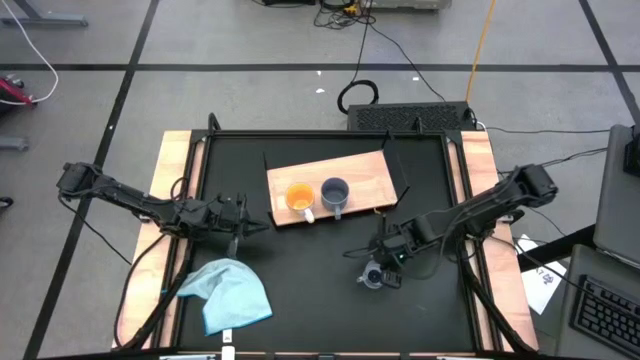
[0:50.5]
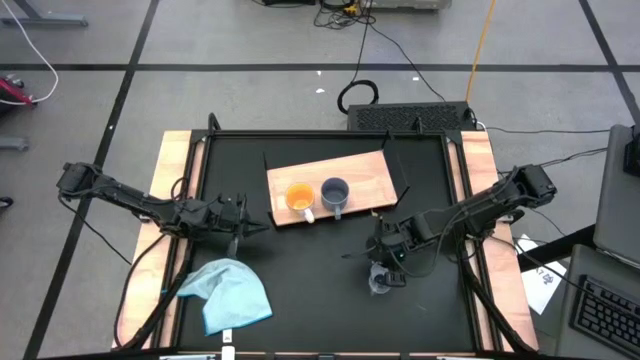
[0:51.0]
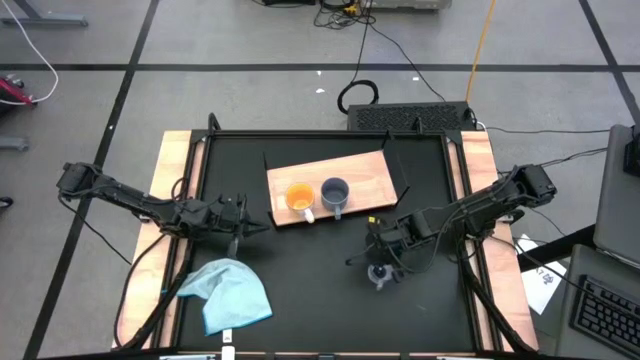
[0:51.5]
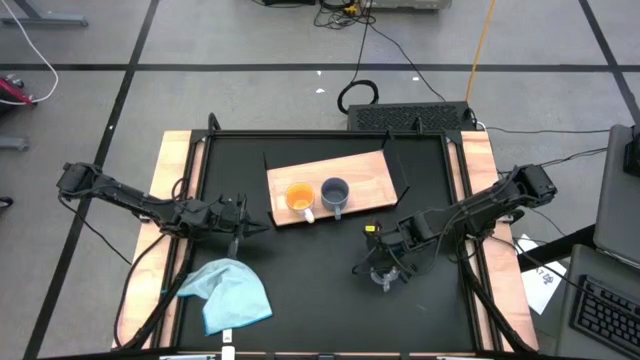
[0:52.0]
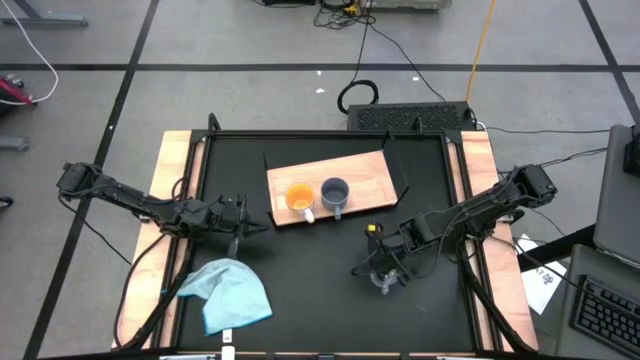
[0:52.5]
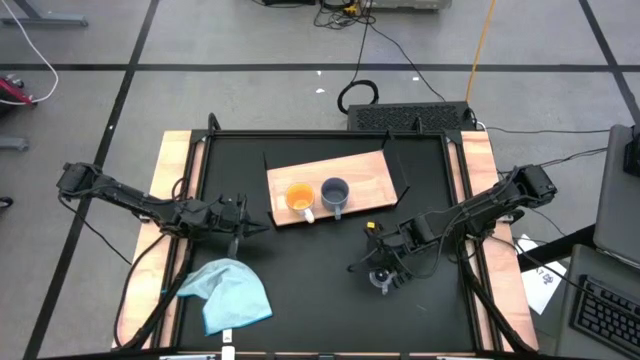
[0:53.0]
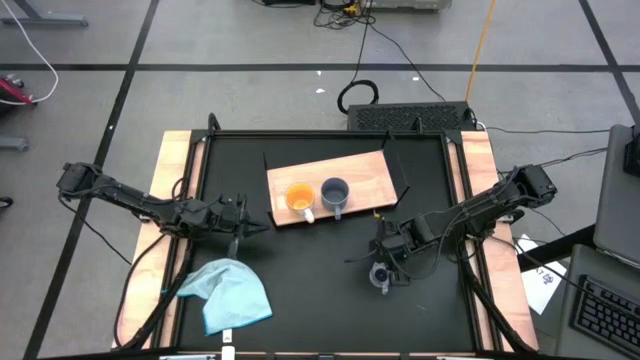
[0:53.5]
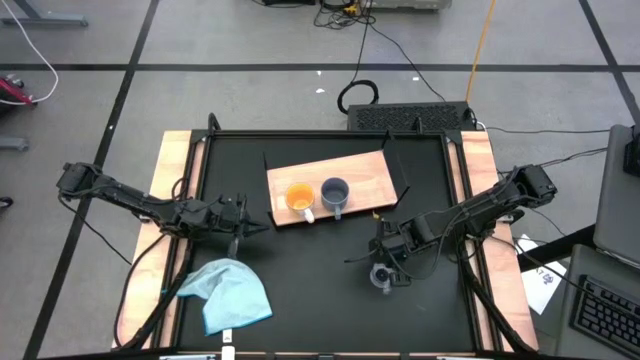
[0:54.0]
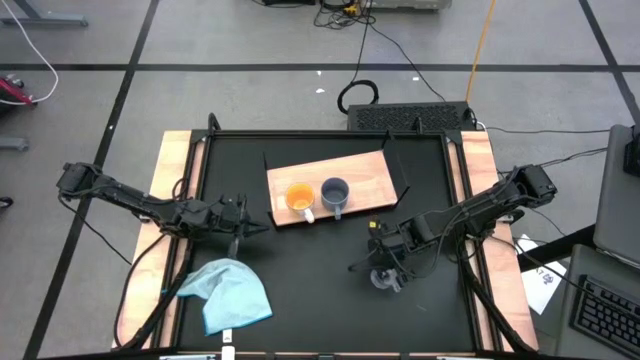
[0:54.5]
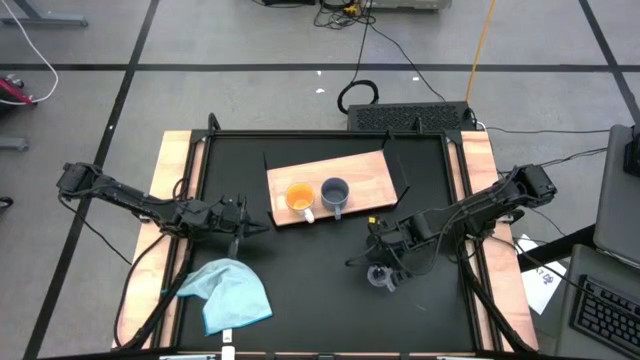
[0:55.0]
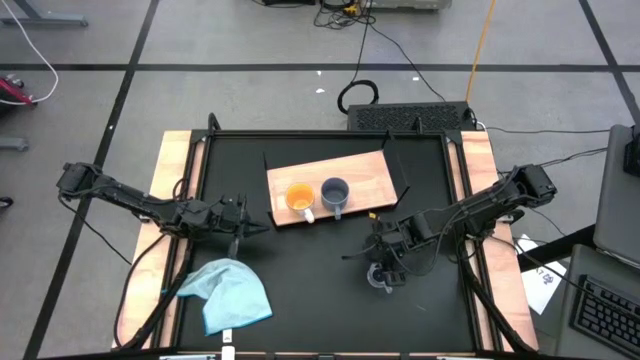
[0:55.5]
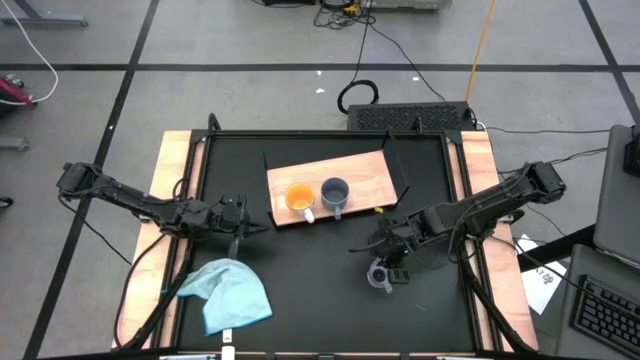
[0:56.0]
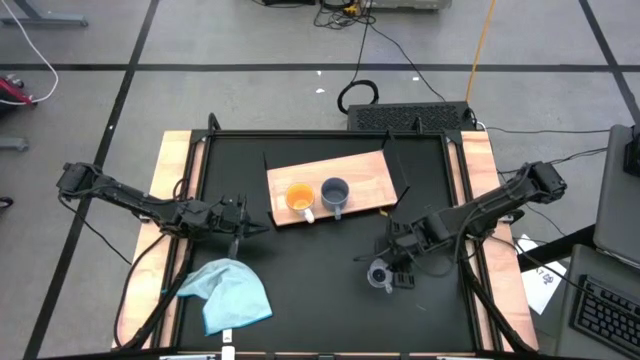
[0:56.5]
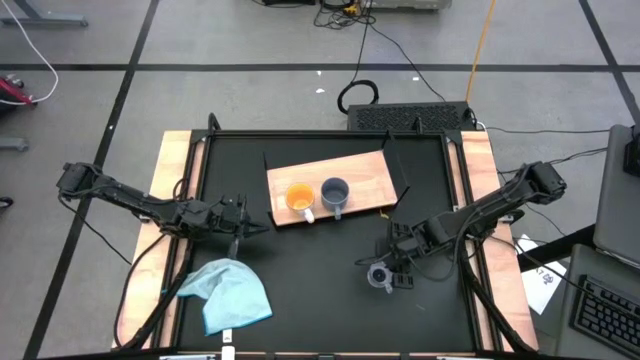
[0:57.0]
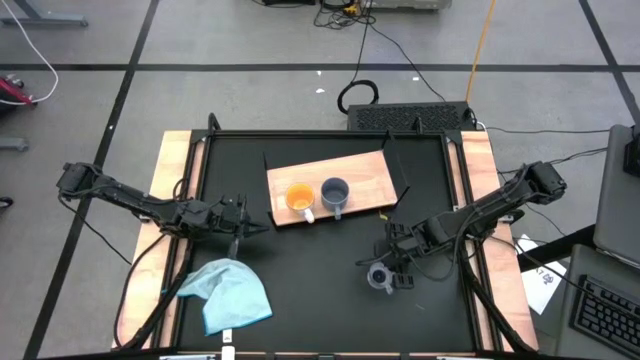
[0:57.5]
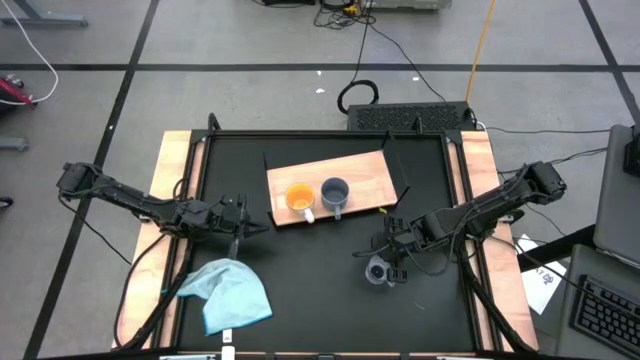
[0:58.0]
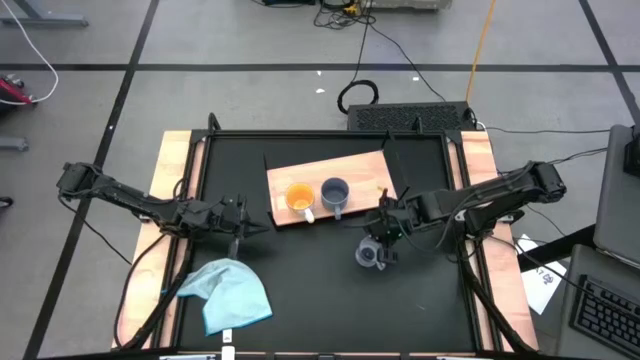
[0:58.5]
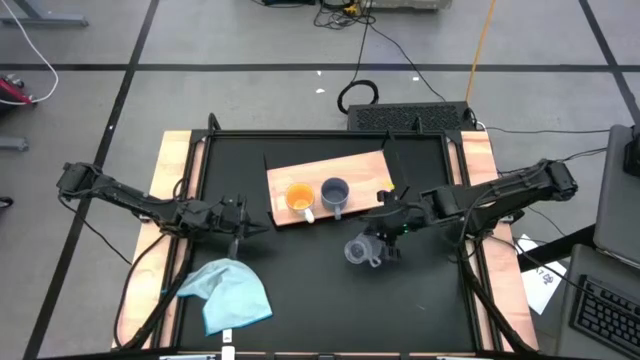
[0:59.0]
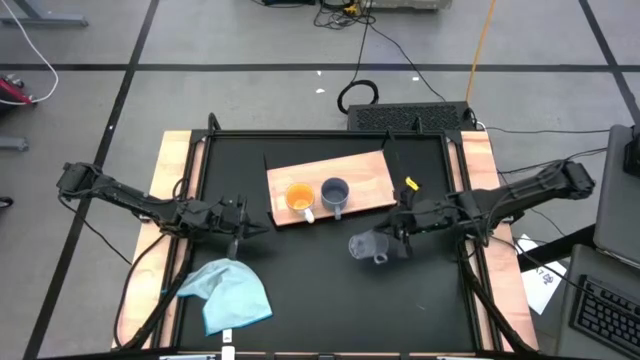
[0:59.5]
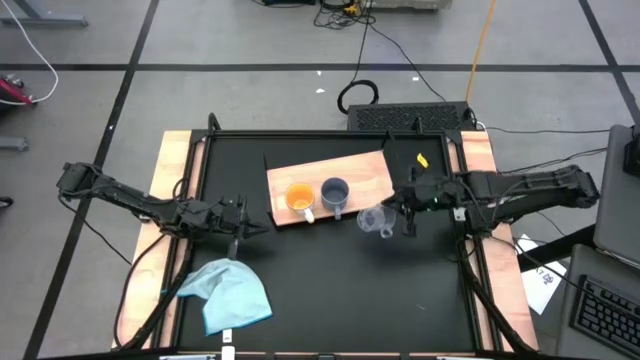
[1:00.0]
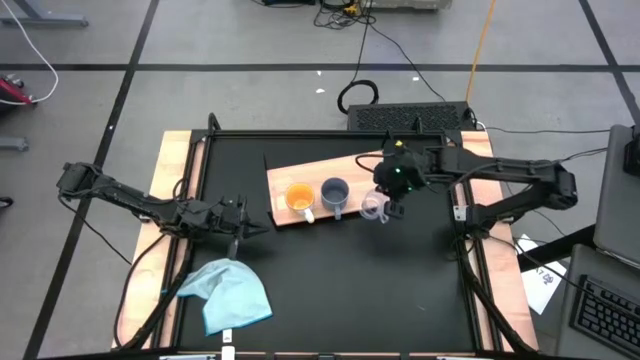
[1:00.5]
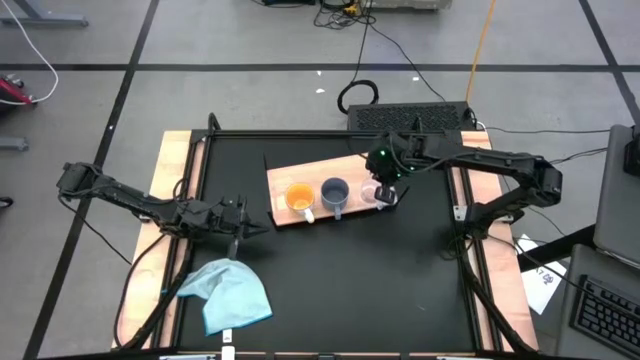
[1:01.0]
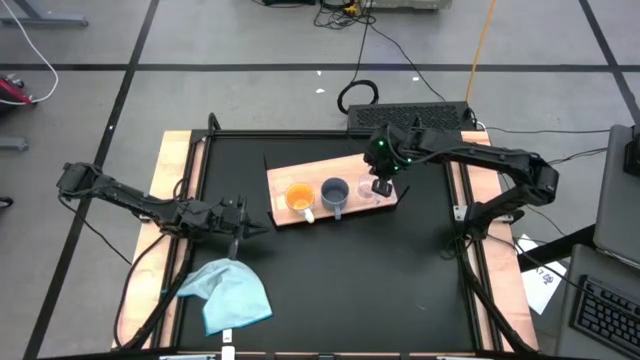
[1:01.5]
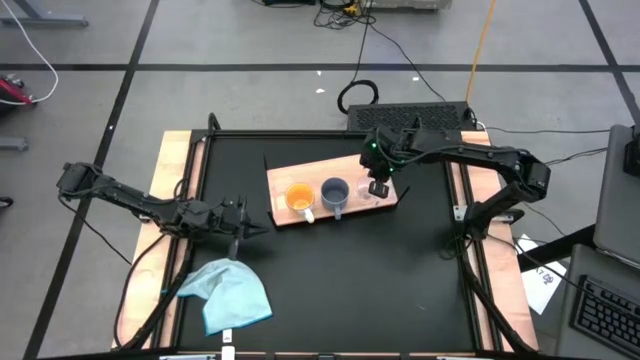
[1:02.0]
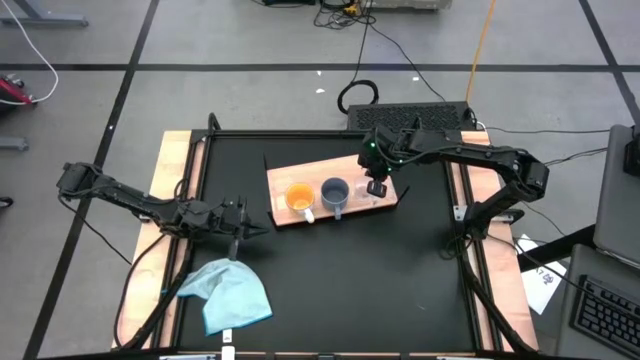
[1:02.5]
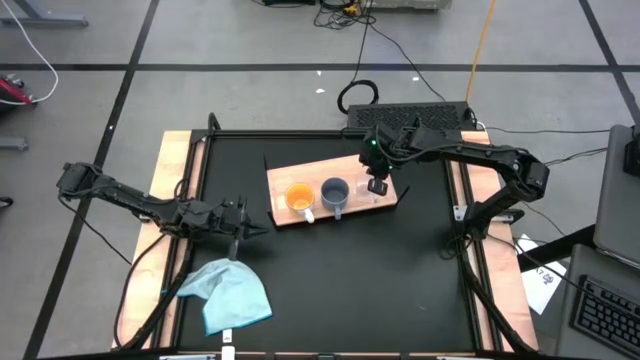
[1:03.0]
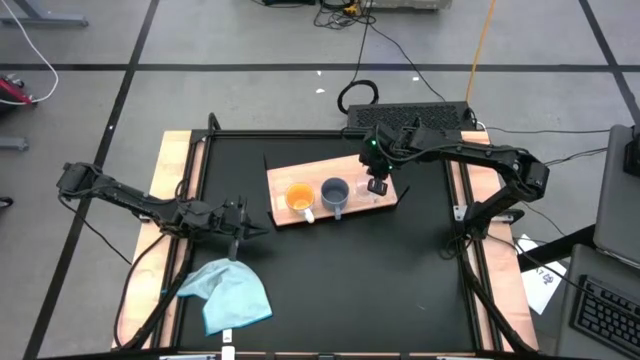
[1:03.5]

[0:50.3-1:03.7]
Task: Stack small to large cups/mugs on shelf
Put the transparent mug on the shelf

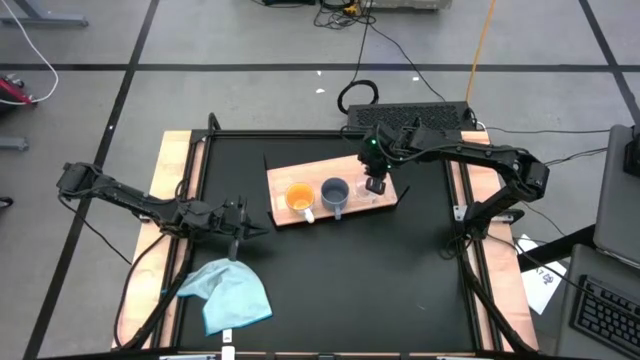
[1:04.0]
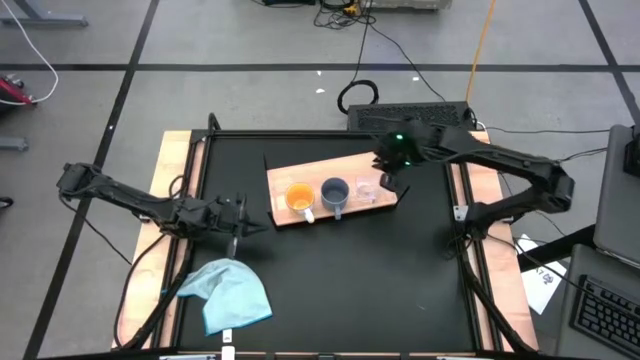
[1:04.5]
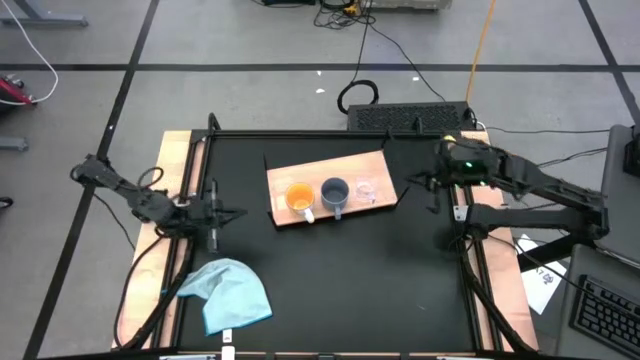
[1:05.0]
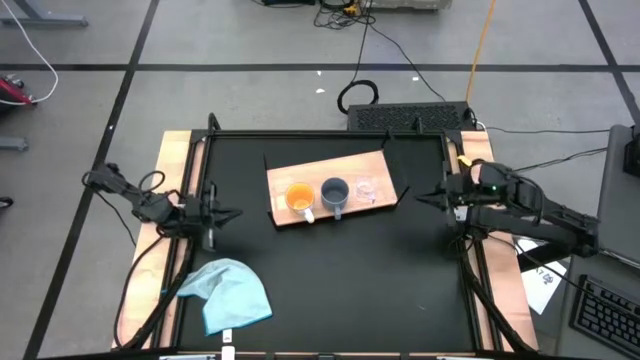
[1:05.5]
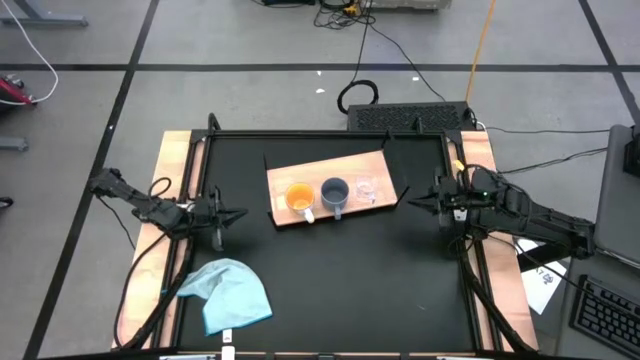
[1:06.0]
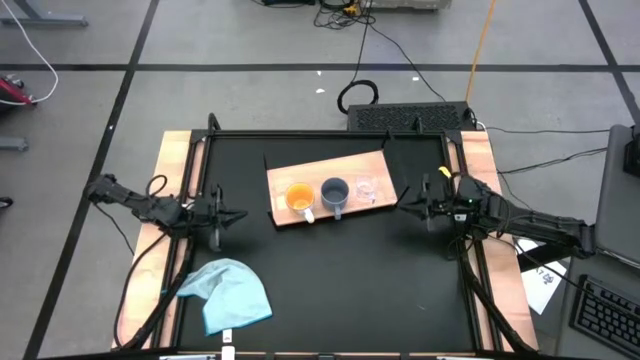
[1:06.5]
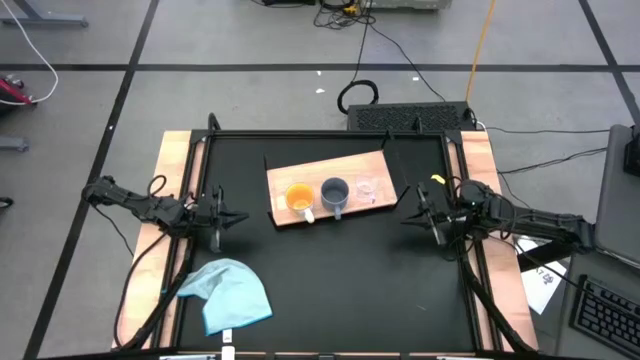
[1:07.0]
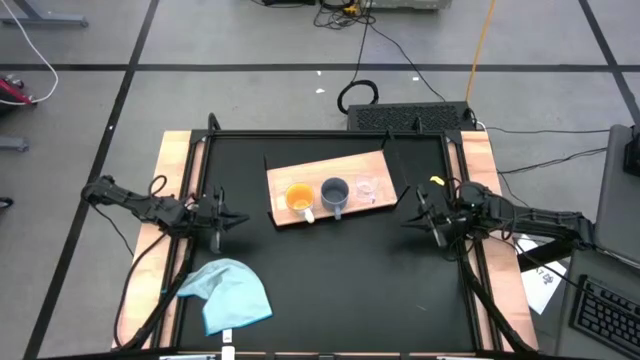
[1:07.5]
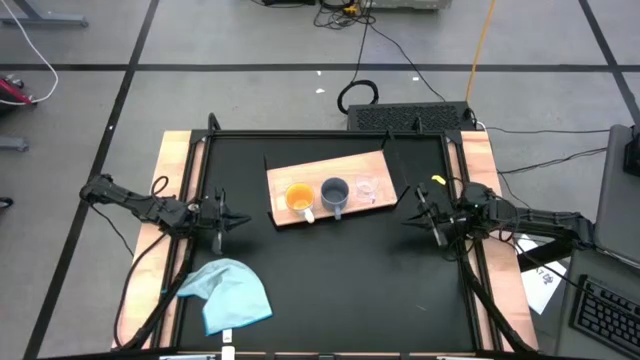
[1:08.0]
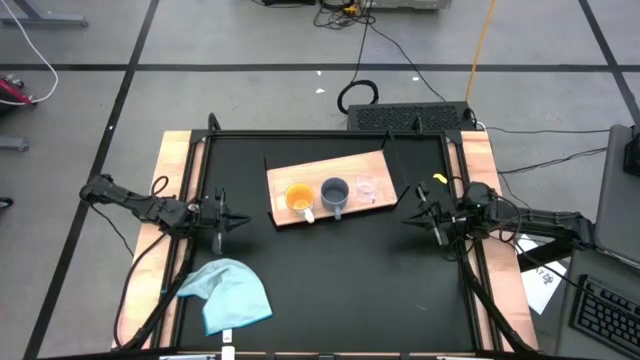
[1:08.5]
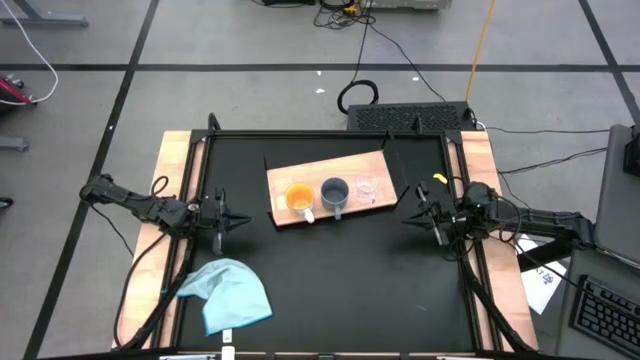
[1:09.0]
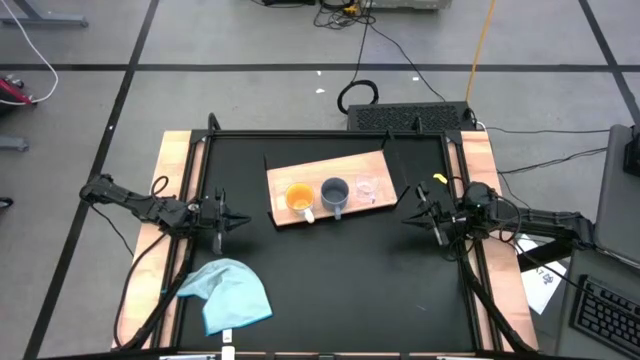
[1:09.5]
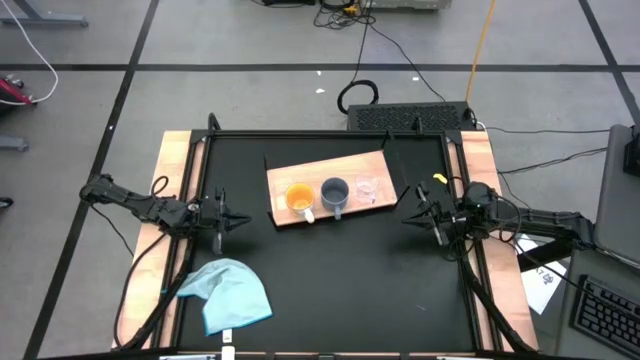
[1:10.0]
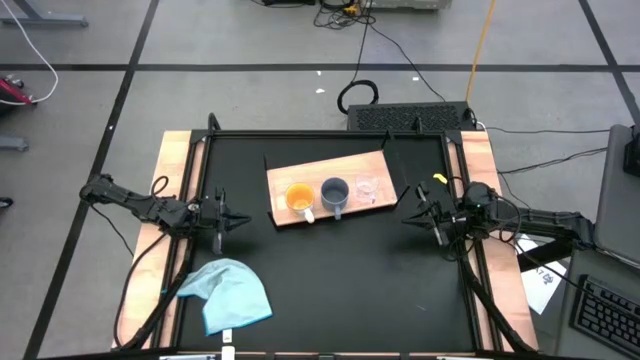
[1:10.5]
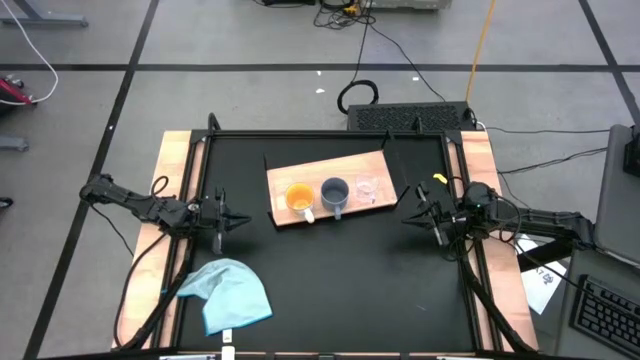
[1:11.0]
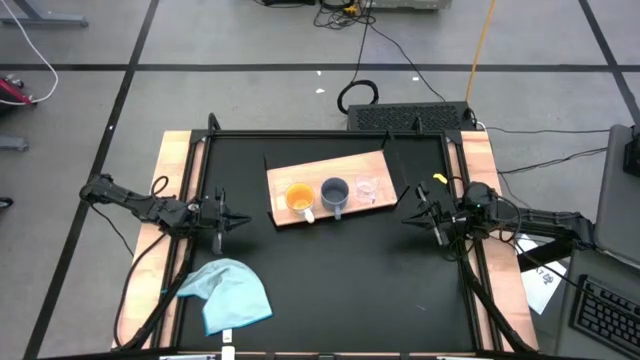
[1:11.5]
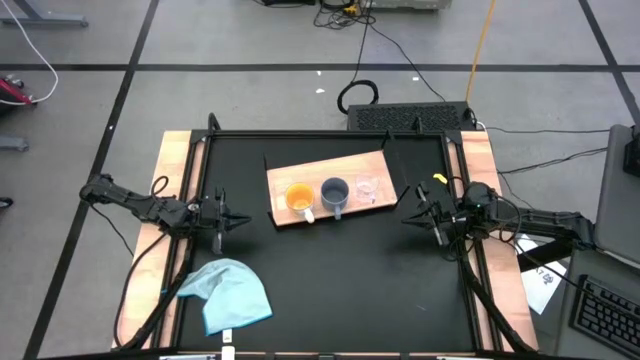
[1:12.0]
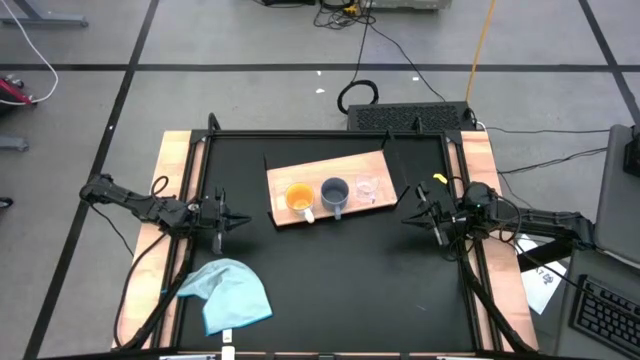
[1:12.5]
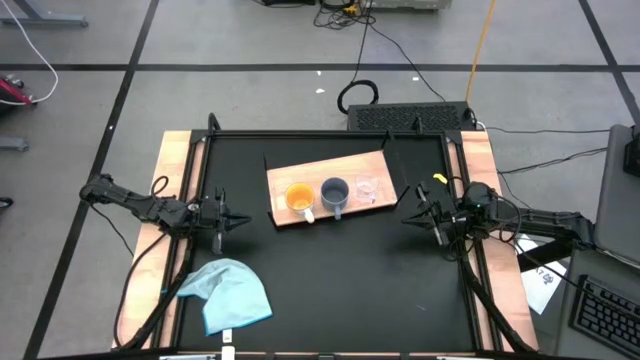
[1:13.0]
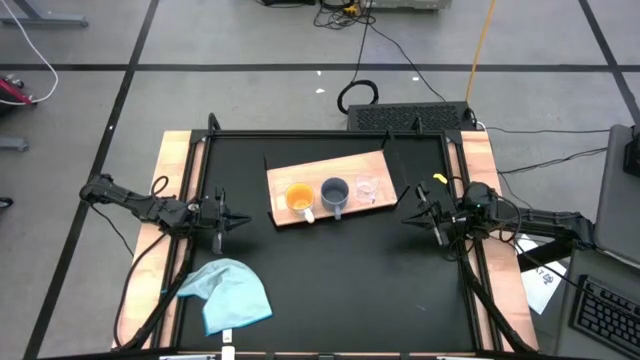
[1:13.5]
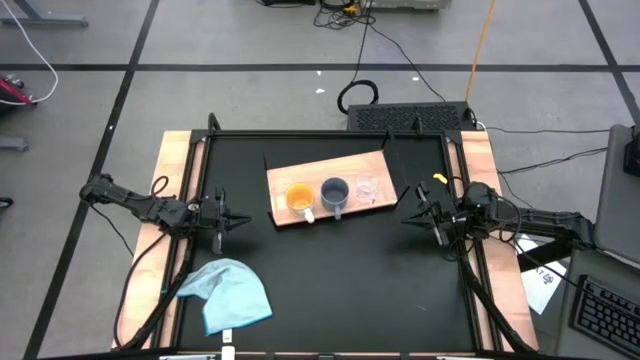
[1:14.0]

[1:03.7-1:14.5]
Return to Home Position
